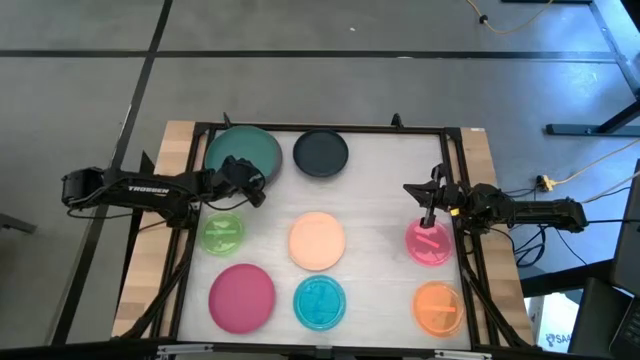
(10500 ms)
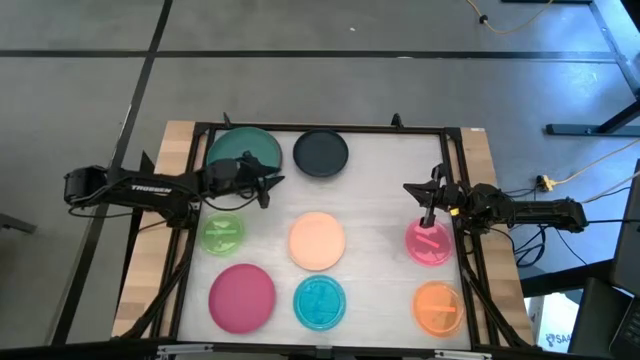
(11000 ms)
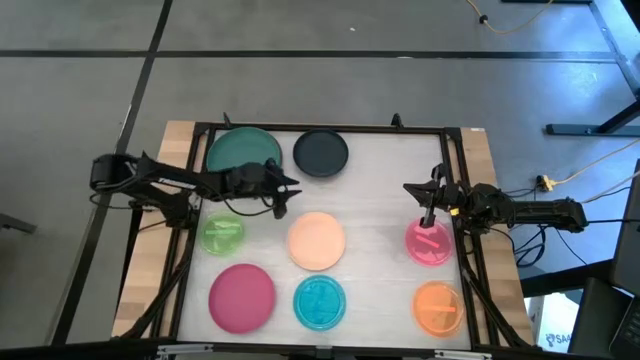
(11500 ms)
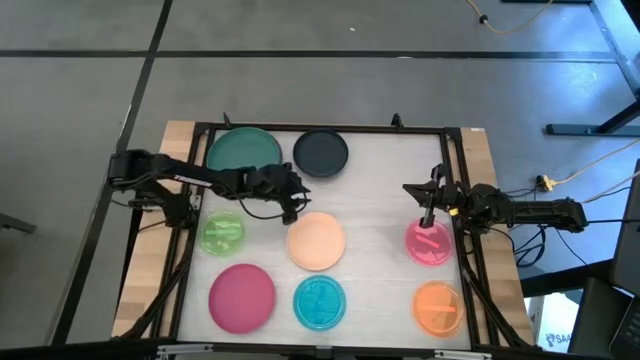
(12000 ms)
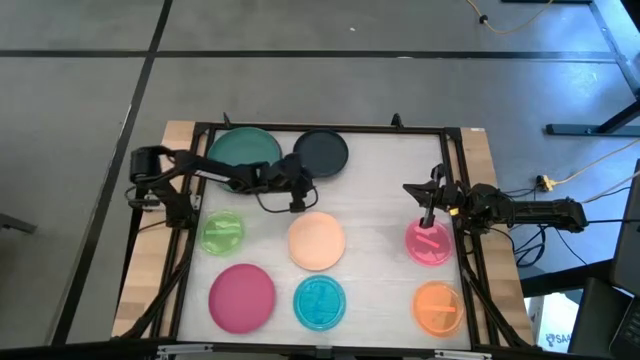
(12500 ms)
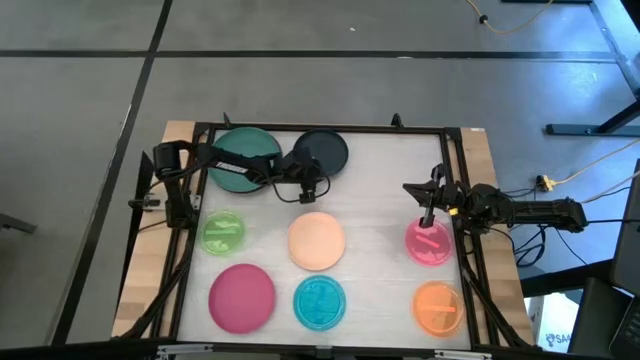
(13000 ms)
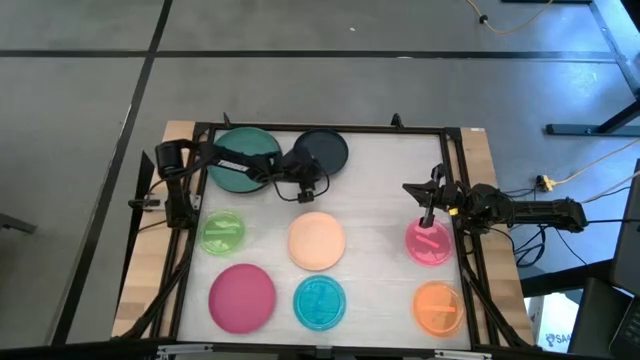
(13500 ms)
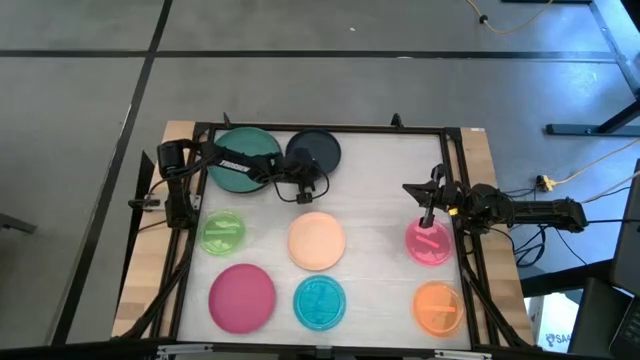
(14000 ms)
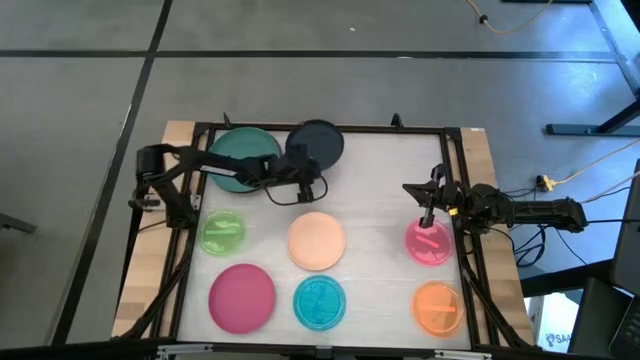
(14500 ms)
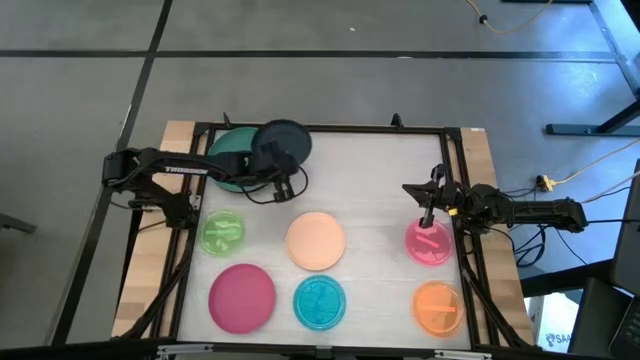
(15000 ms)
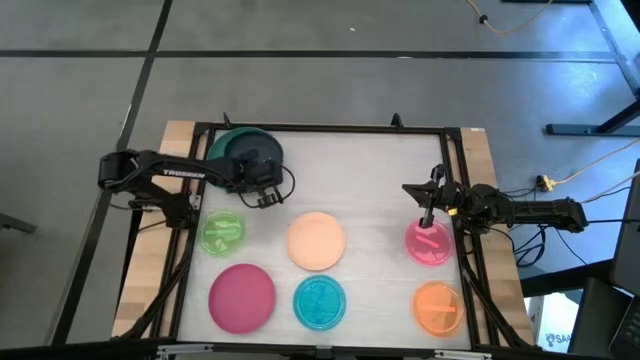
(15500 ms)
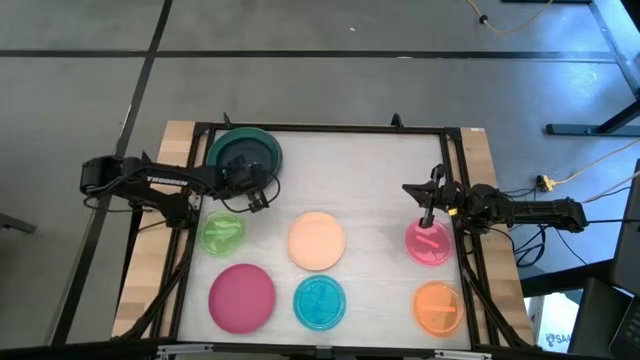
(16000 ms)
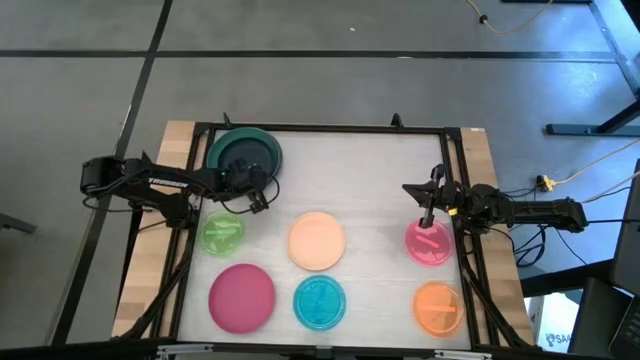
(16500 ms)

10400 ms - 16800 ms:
Task: Stack plastic plates
Stack the black plate on top of the green plate

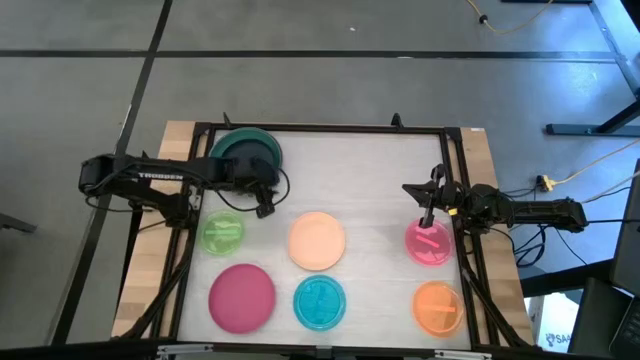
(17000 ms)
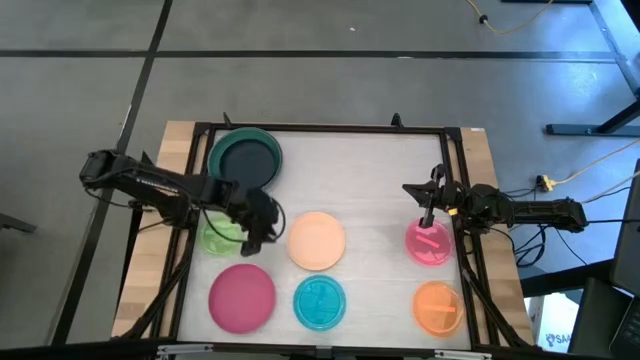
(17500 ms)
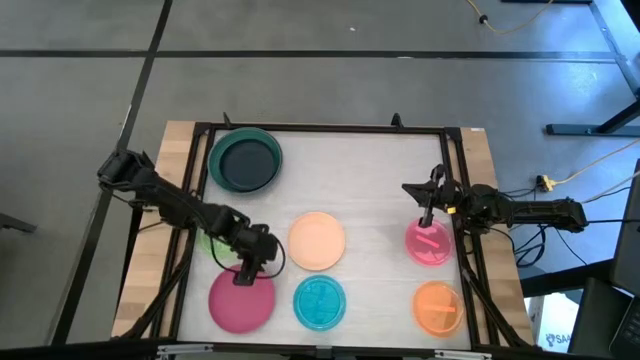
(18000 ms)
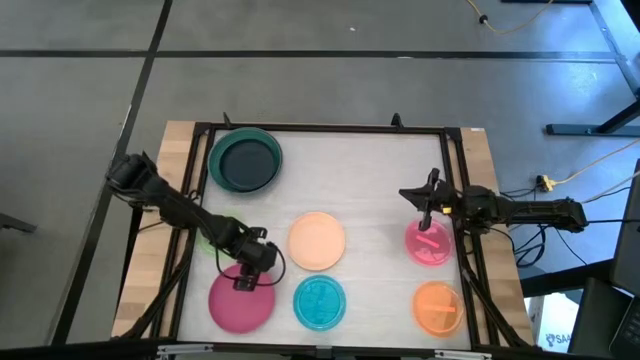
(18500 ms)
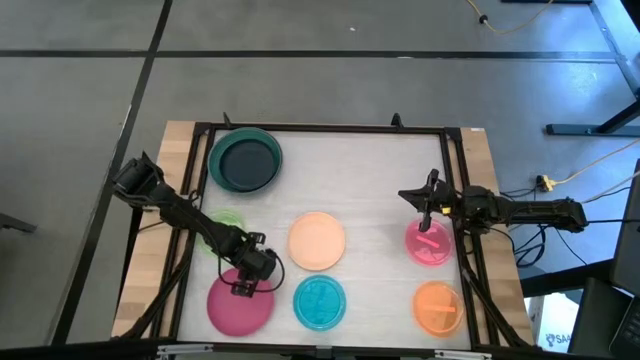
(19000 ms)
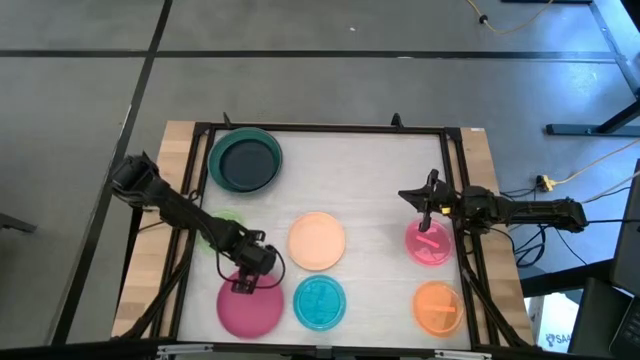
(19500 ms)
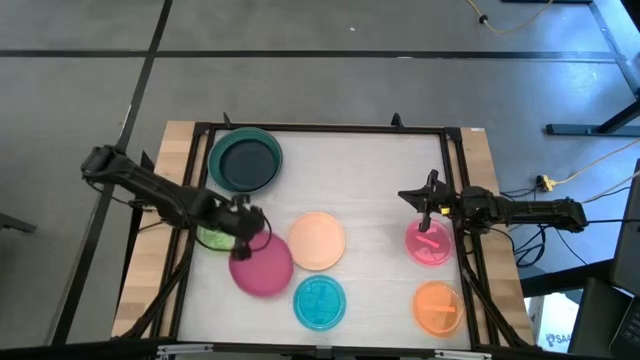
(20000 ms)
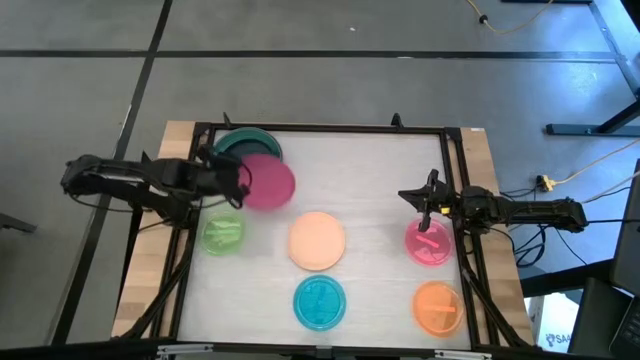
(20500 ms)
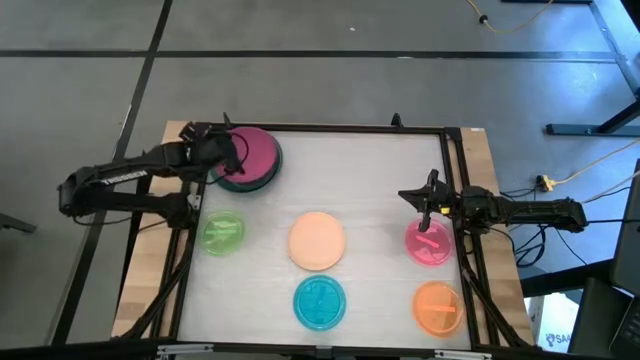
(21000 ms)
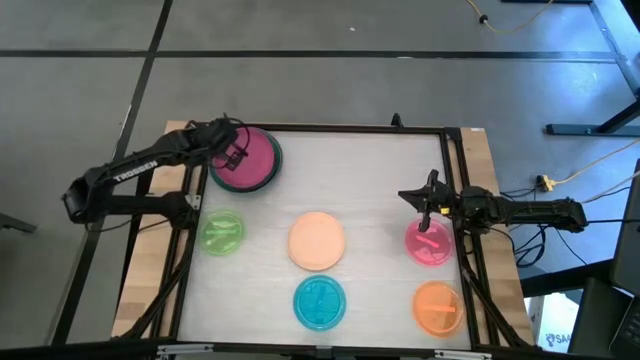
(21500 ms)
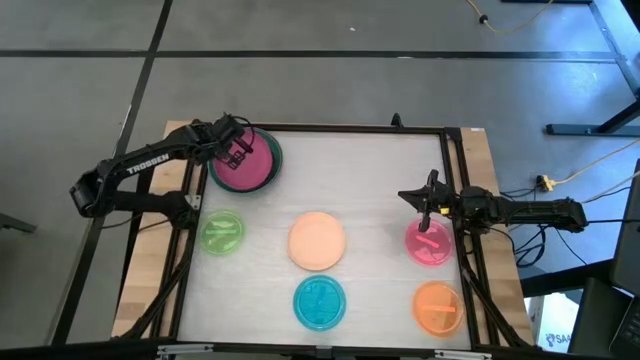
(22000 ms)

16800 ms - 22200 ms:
Stack the pink plate on top of the black plate

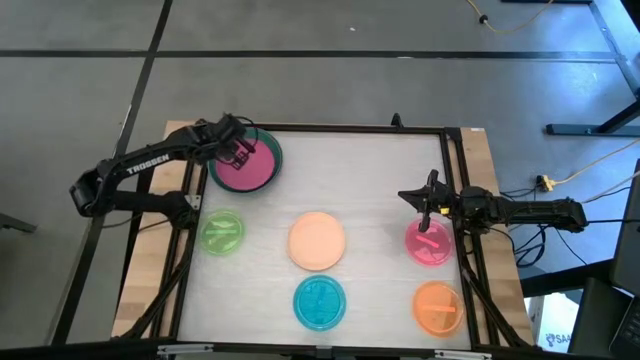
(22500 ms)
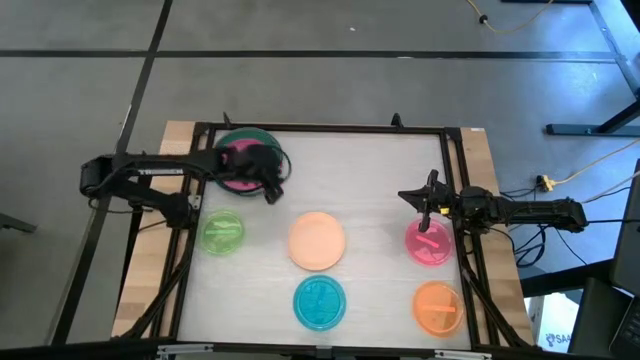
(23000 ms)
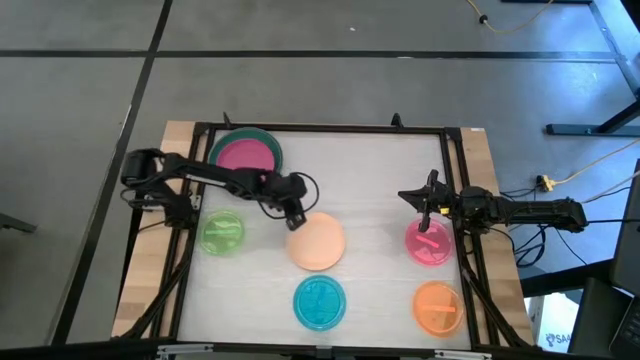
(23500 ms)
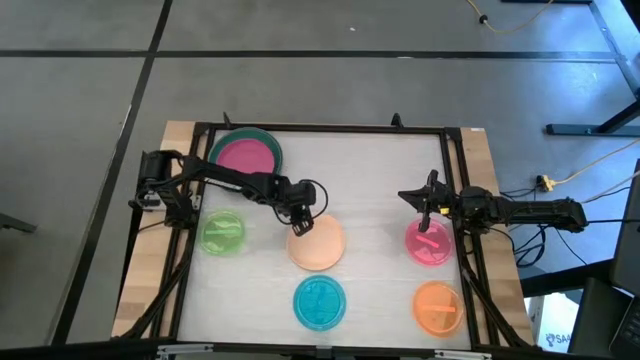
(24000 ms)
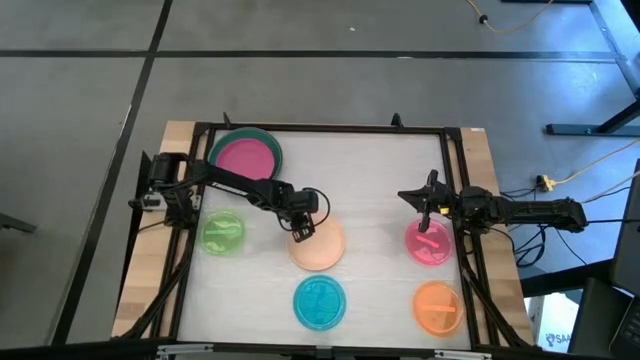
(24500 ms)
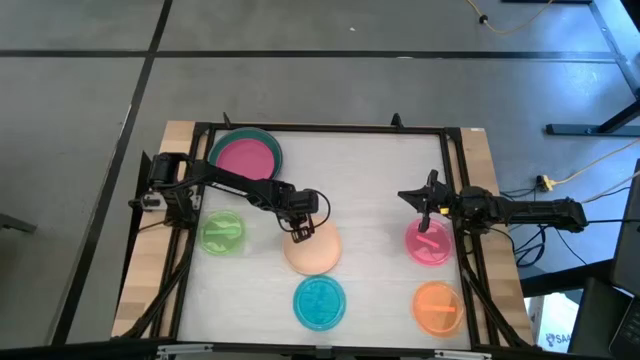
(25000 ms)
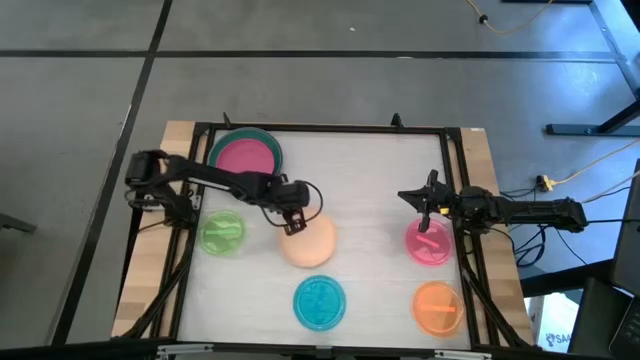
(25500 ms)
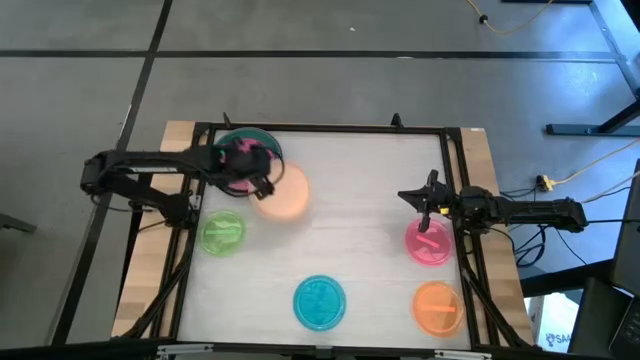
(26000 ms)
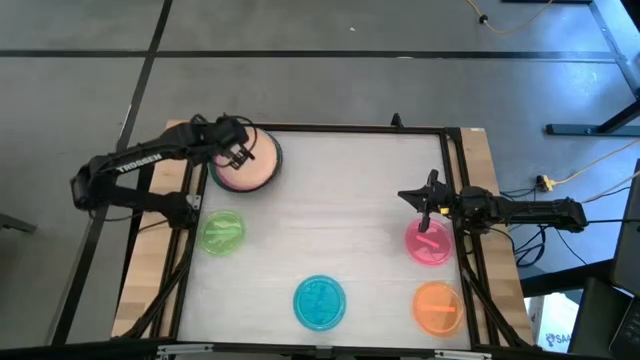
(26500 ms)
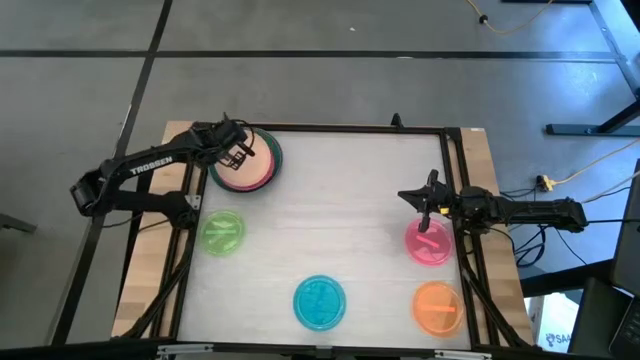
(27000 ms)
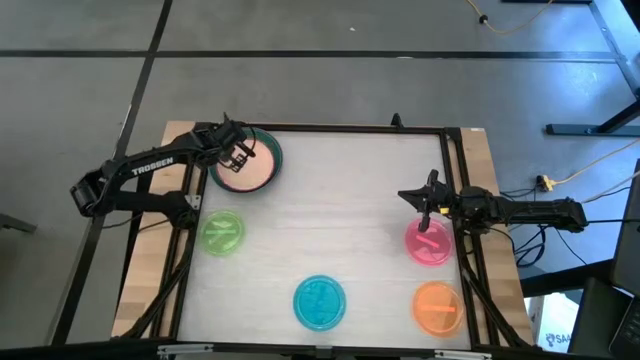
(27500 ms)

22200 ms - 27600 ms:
Stack the brown plate on top of the pink plate

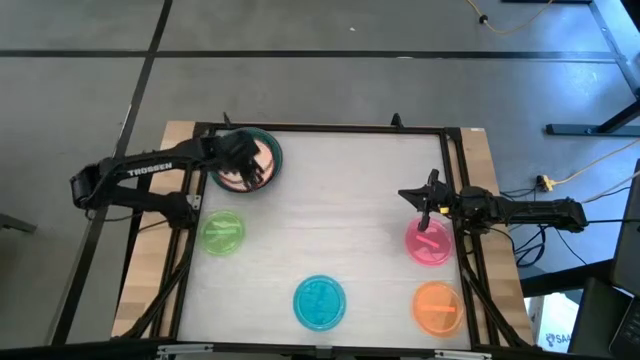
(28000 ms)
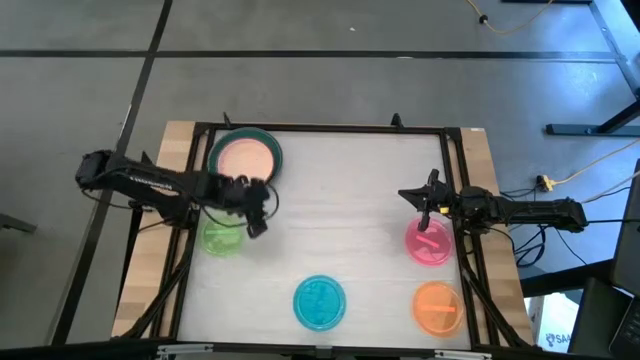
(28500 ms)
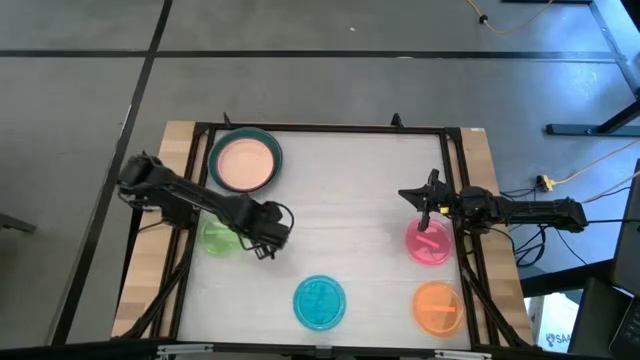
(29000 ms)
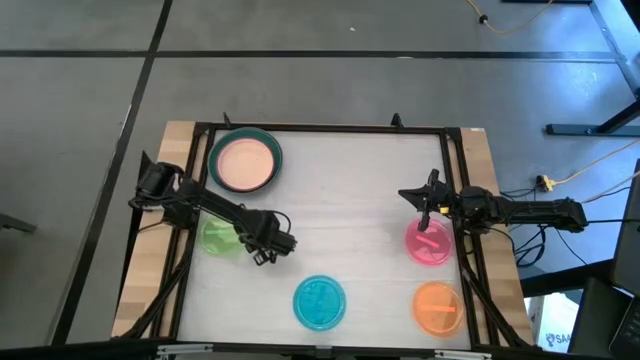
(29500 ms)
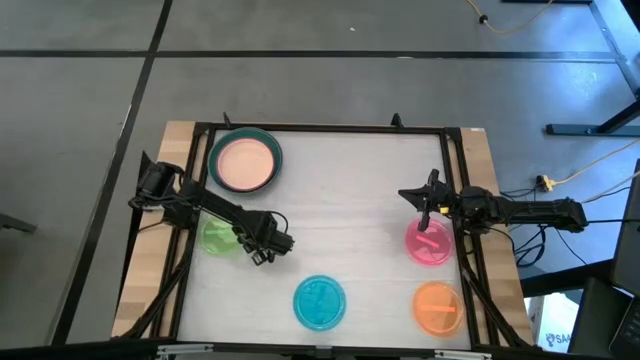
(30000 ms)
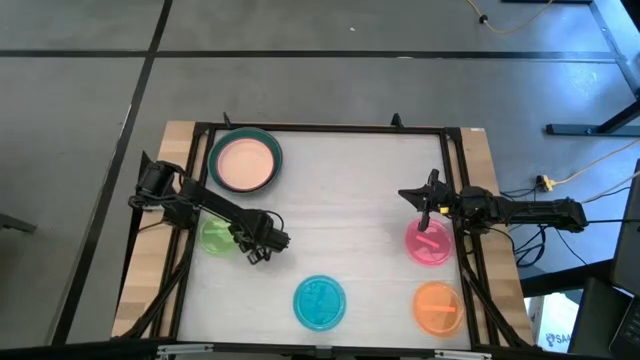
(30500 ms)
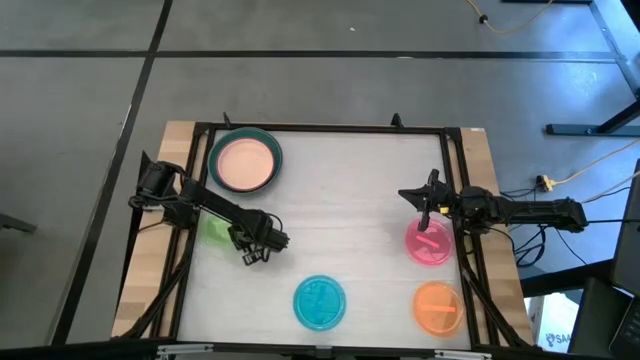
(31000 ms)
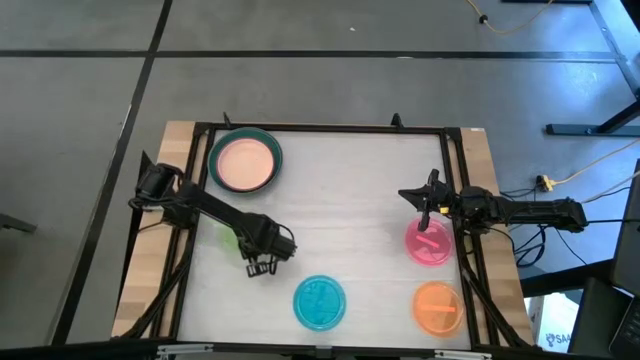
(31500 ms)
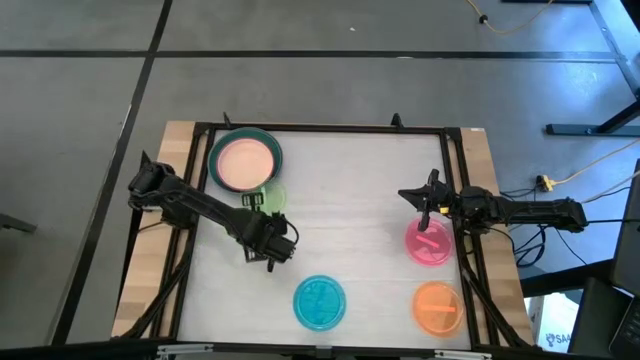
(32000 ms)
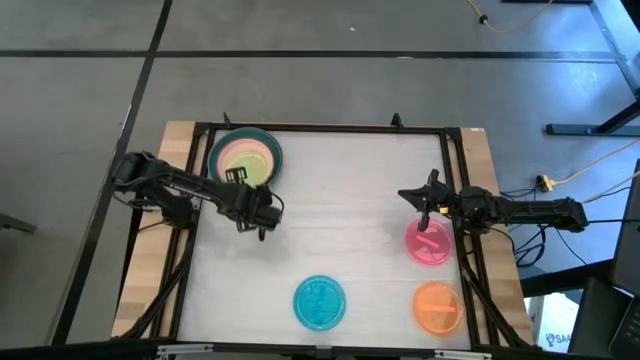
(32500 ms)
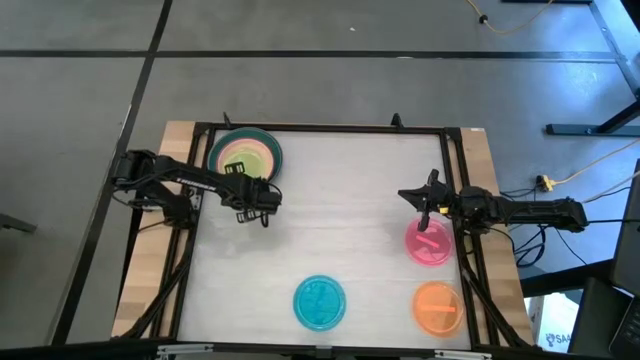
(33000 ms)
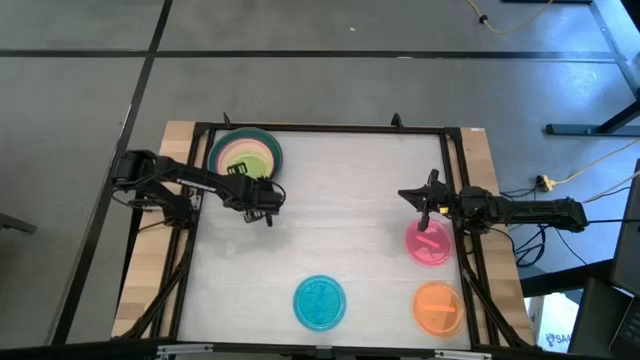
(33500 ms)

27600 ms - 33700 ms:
Stack the light green plate on top of the brown plate
